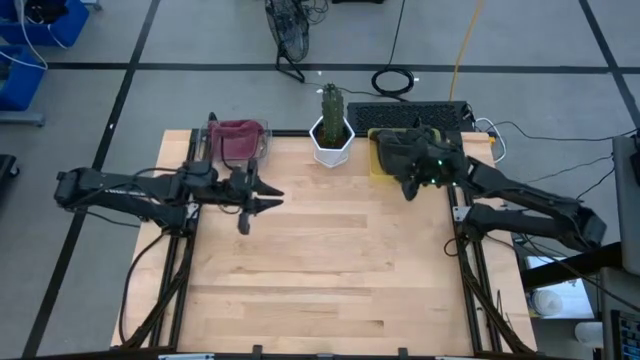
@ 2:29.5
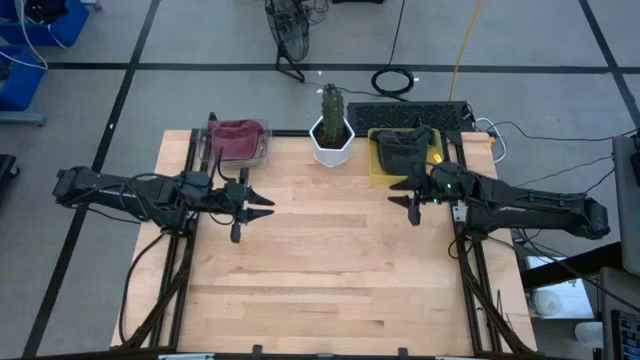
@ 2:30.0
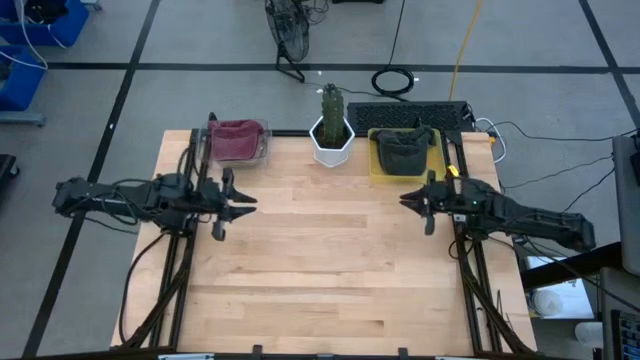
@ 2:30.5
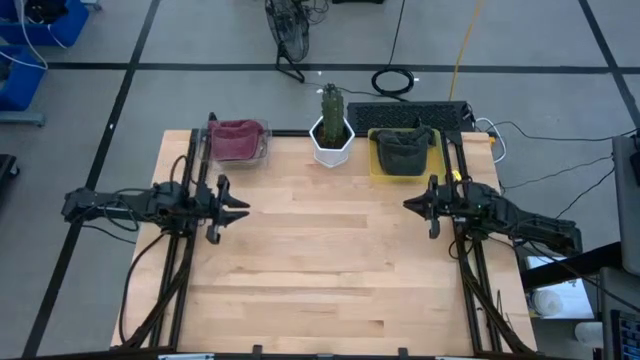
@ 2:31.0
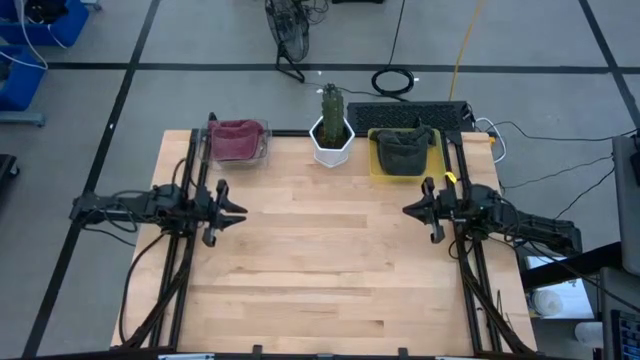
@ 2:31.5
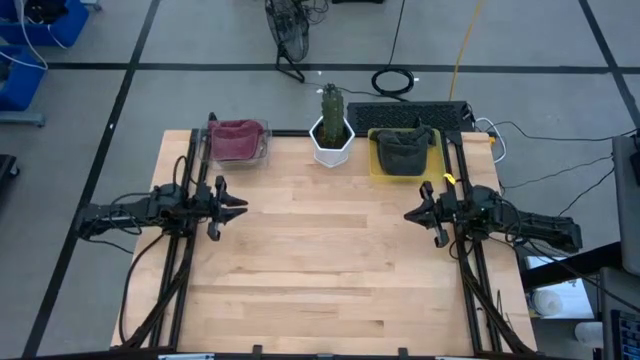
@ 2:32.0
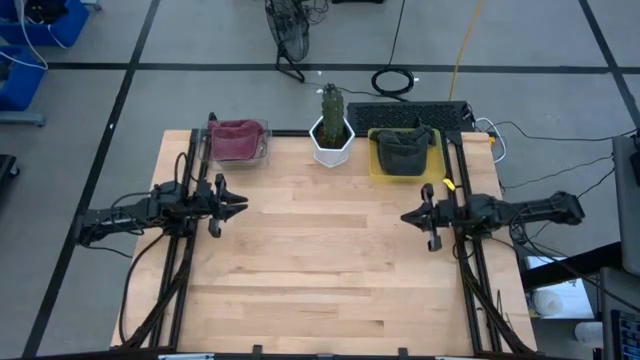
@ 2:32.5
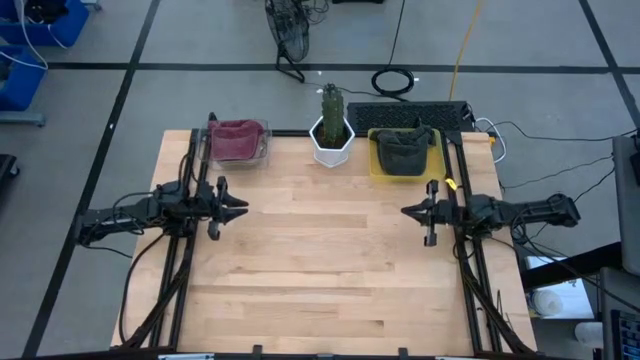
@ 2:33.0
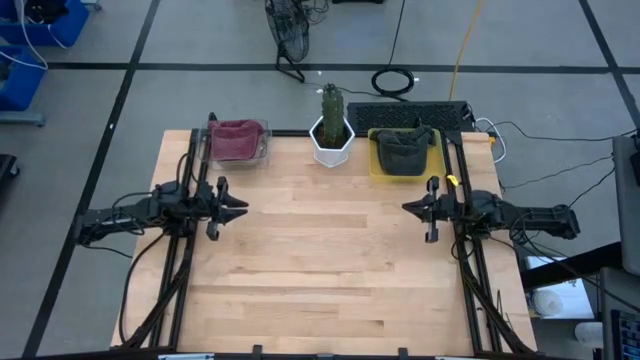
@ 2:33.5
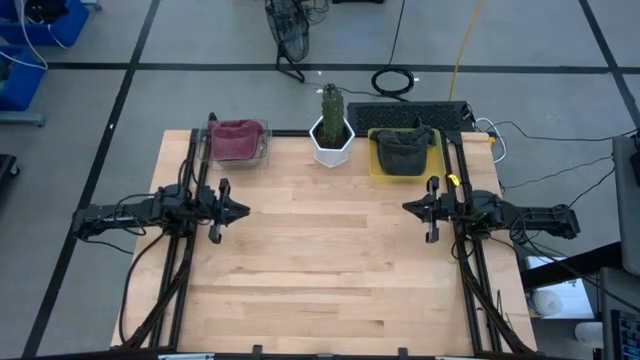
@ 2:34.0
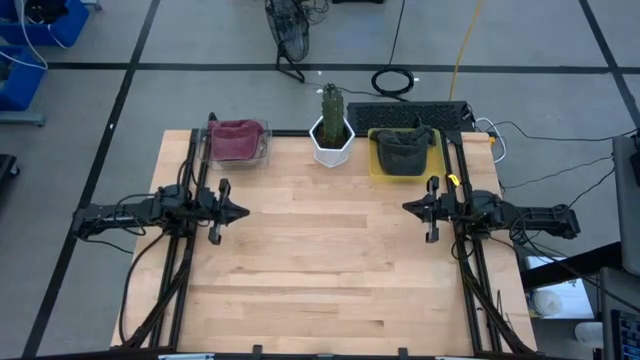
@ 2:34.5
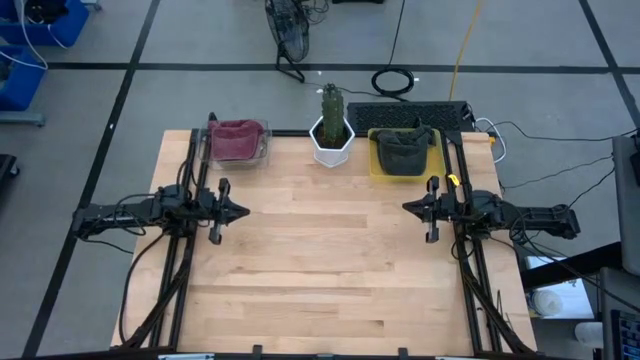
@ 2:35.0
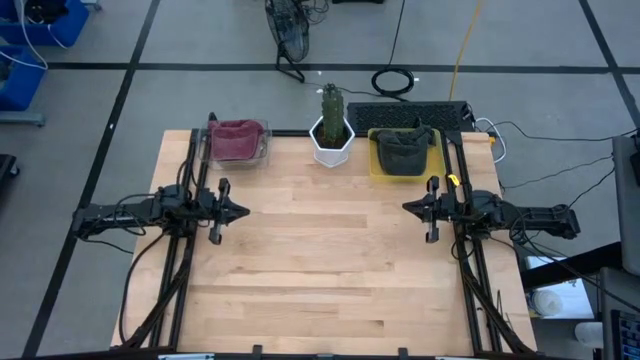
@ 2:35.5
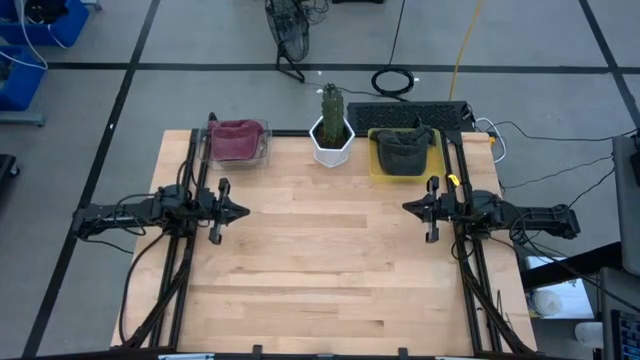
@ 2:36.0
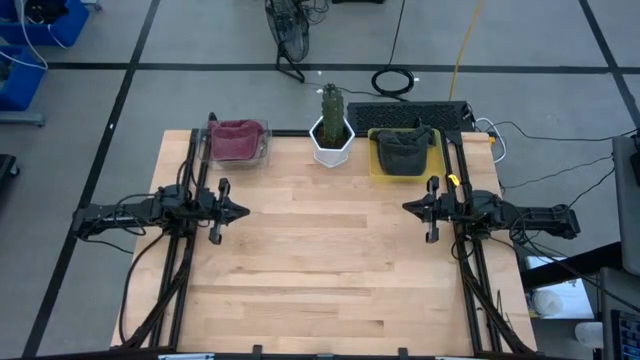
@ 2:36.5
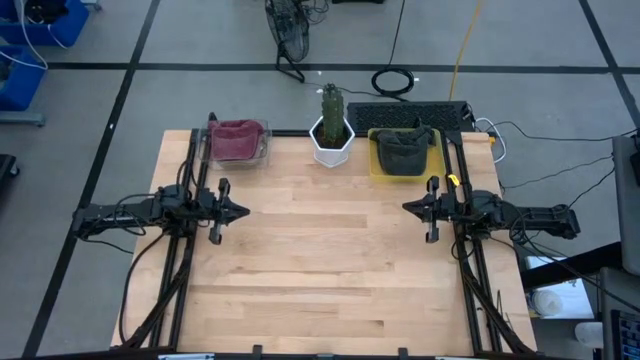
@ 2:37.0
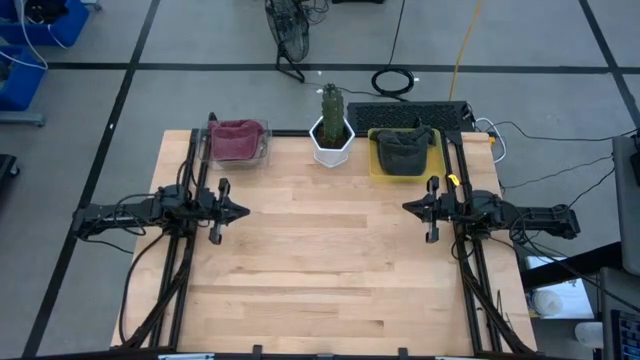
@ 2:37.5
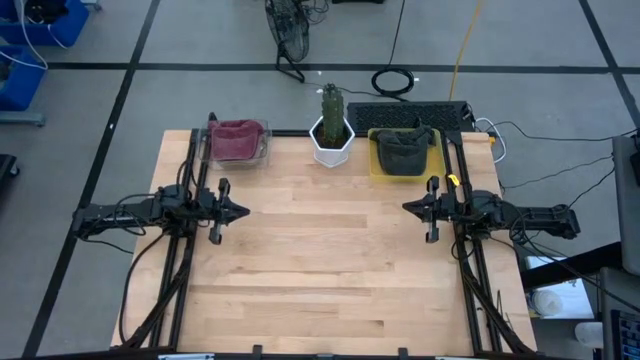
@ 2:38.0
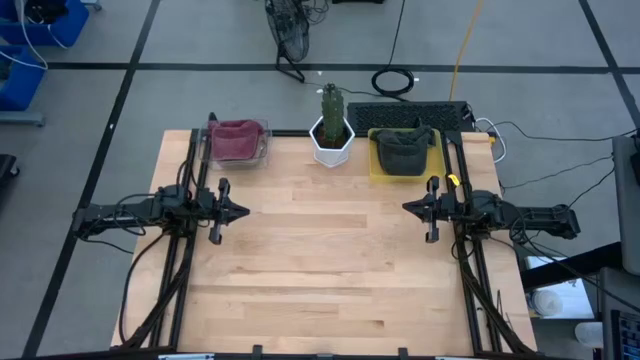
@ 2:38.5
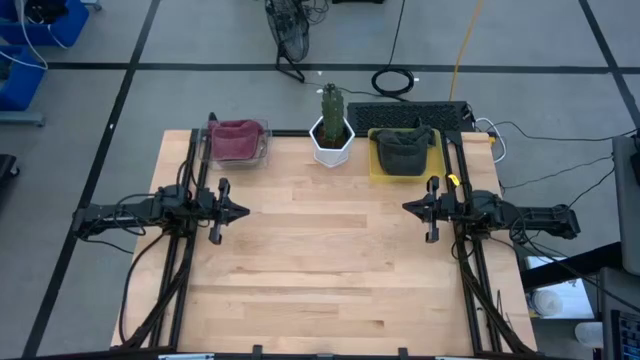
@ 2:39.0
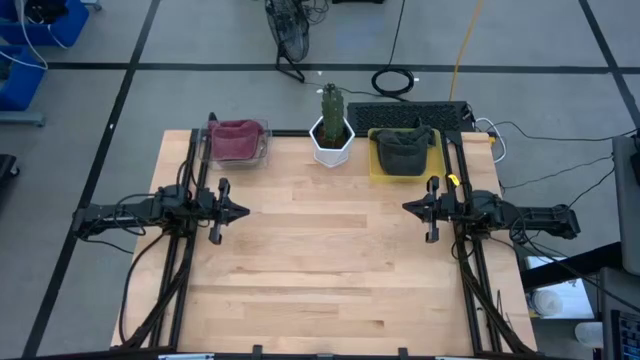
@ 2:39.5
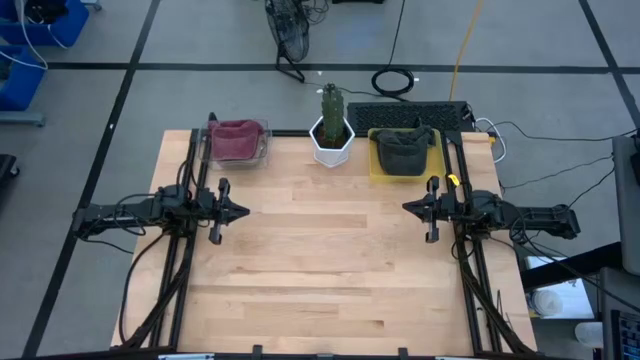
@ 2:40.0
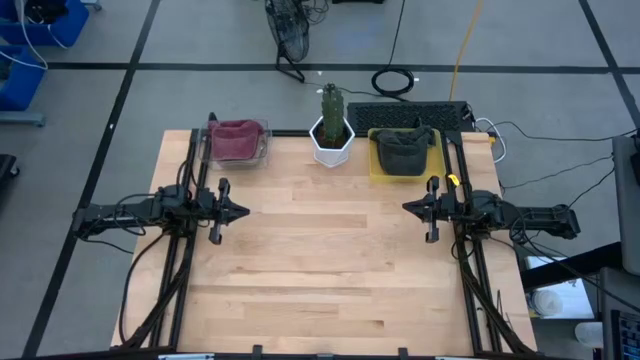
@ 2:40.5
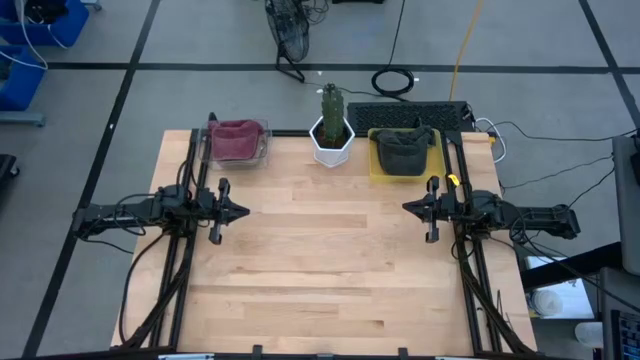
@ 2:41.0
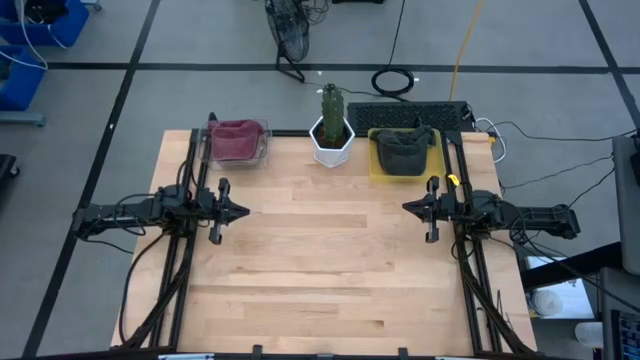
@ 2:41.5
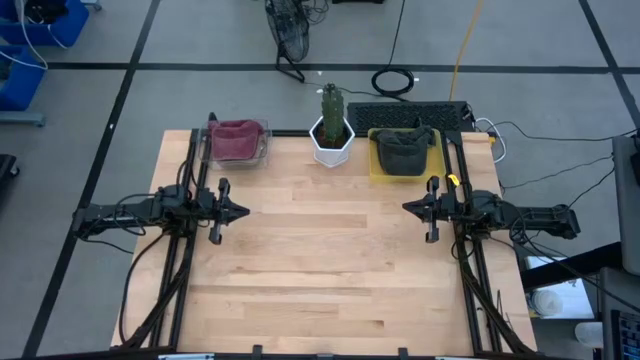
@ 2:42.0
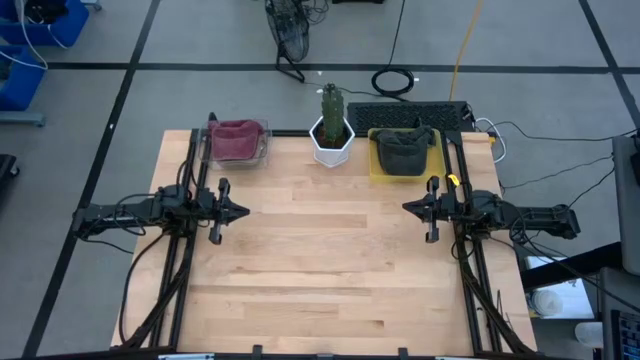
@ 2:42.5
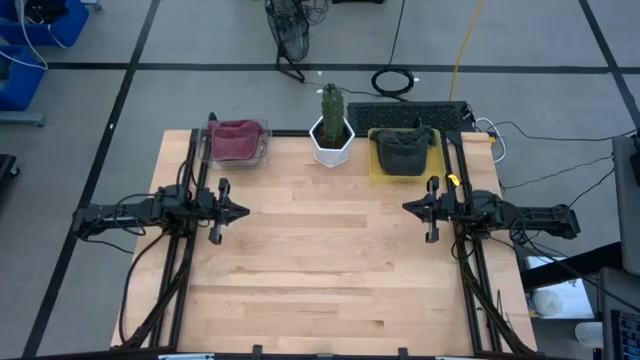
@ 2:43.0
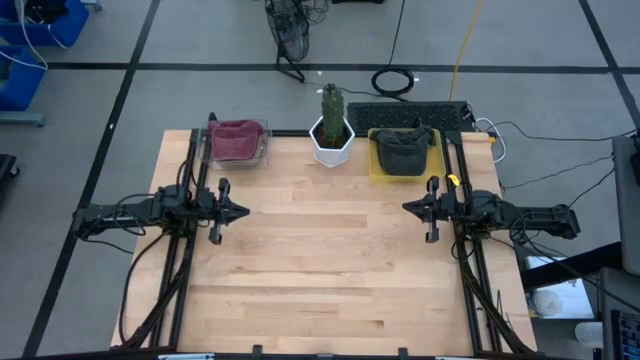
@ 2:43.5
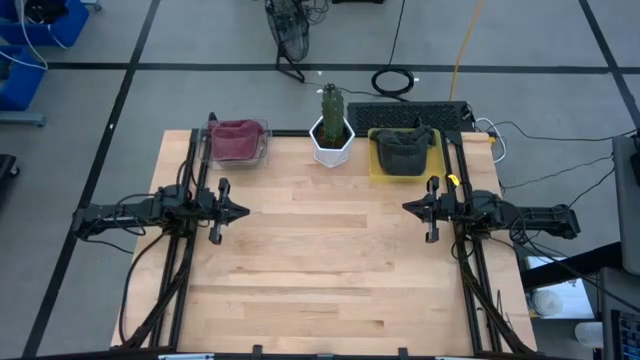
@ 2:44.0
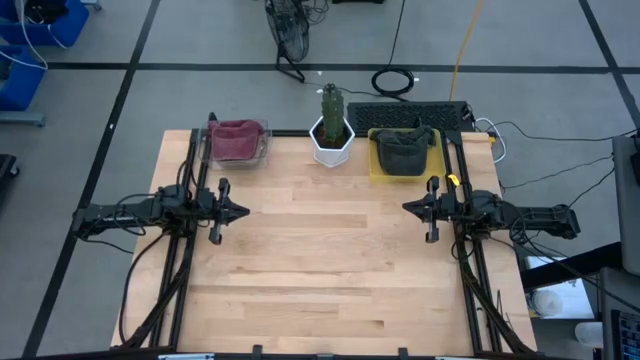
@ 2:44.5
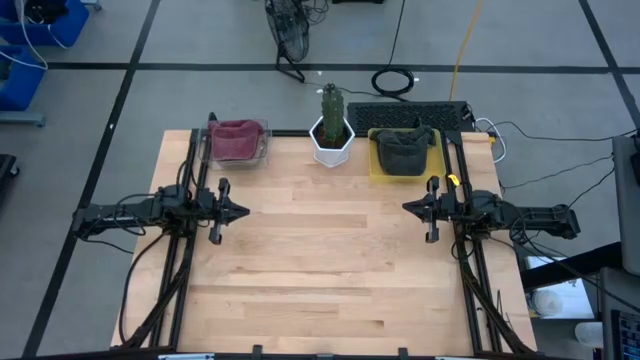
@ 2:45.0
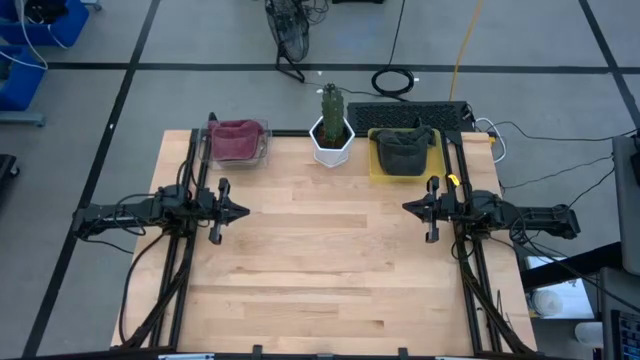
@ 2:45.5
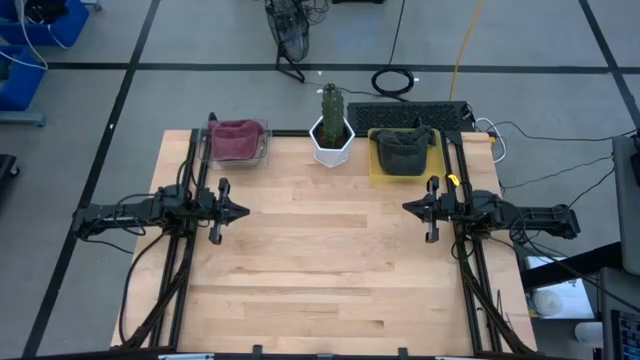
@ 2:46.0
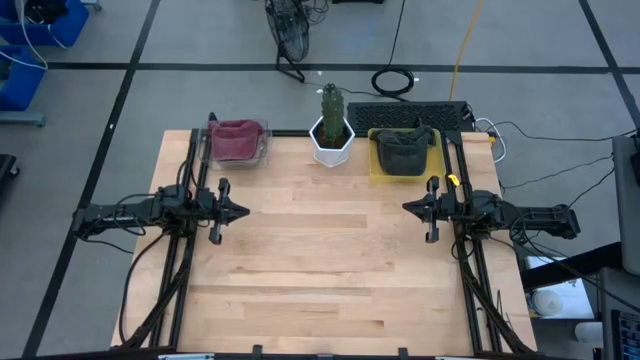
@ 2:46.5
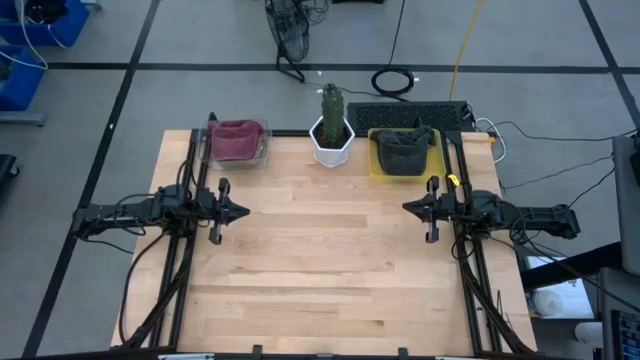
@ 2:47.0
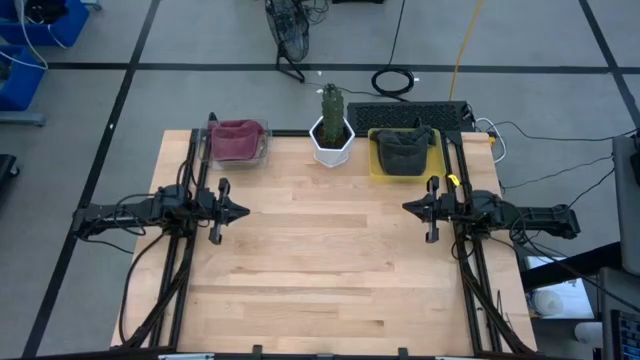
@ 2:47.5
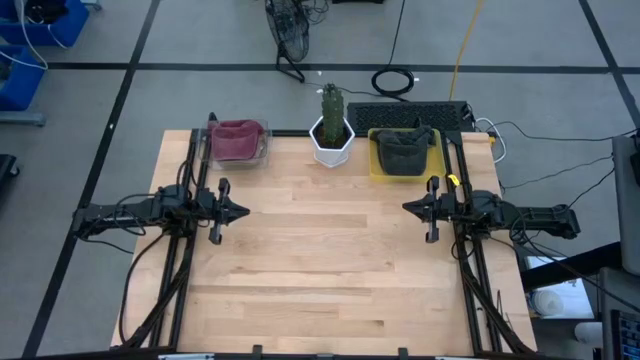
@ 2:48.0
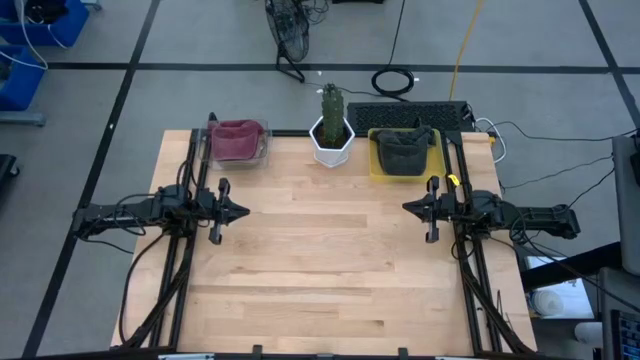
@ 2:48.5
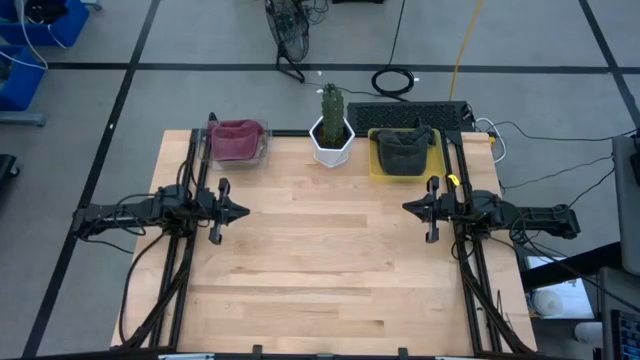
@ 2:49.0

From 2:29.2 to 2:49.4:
Task: Pick & Place hat
Return to Home Position

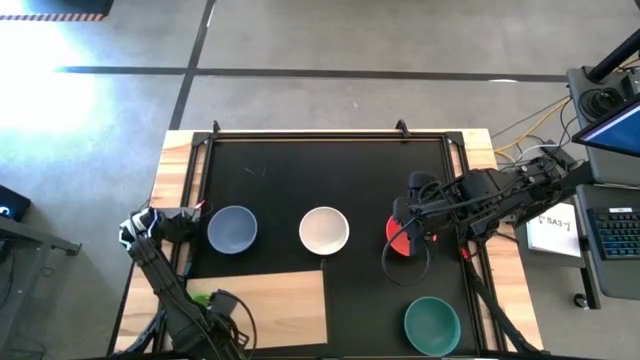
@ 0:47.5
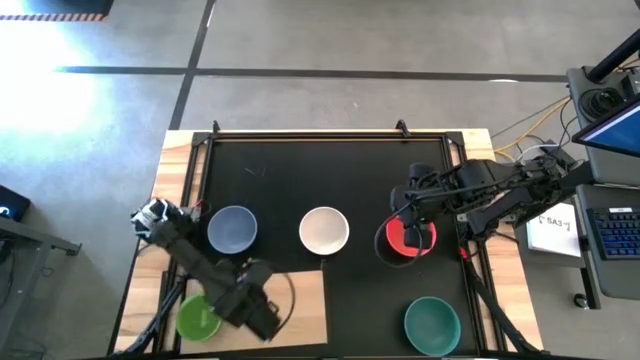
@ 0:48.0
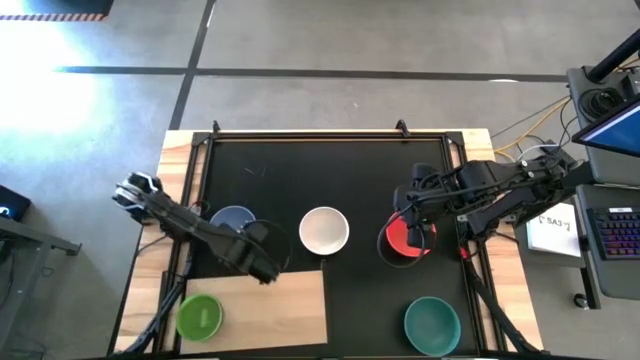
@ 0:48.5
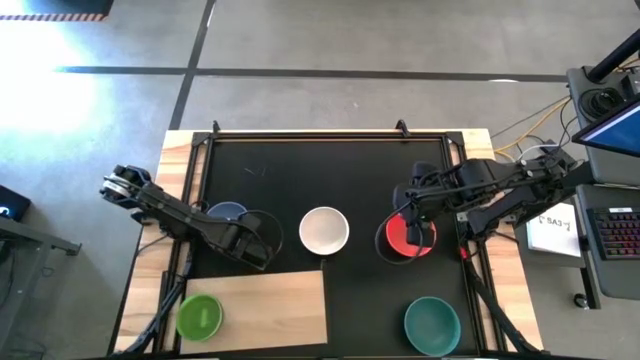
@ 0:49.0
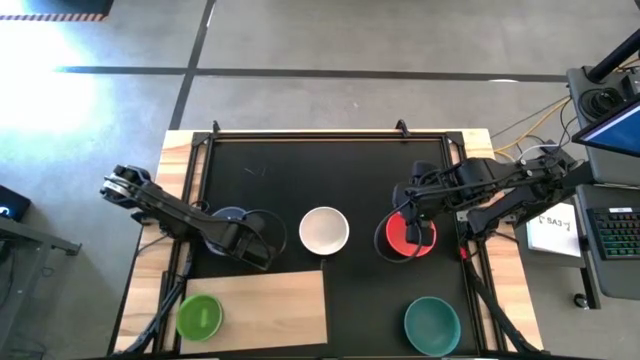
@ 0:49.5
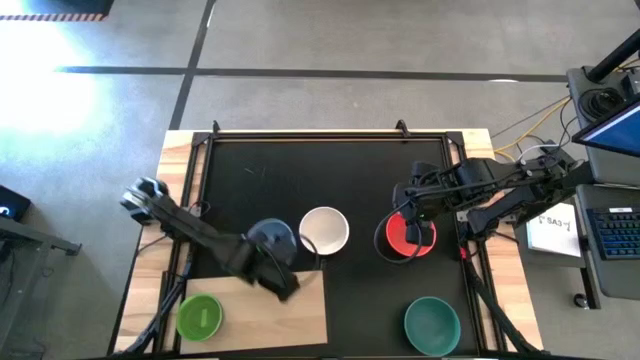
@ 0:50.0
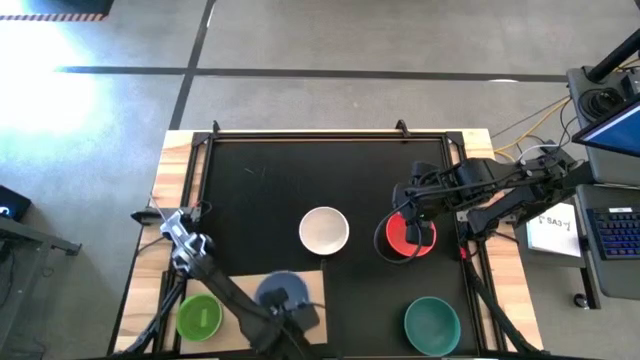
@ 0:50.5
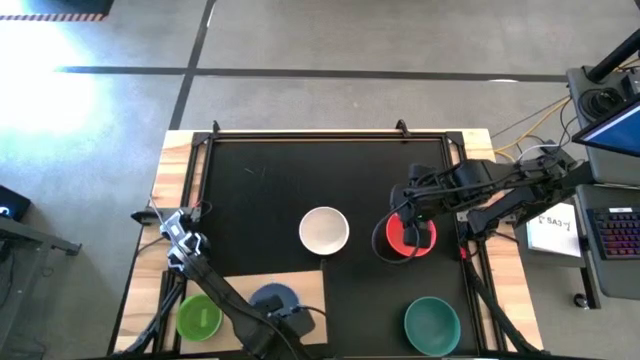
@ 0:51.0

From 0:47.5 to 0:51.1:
Task: Place and stack bowls onto a shelf
Put the purple bowl on the shelf
